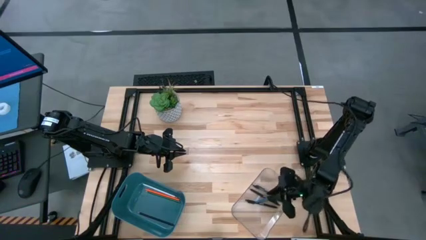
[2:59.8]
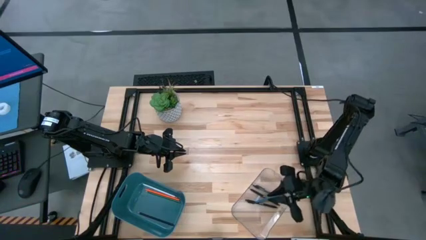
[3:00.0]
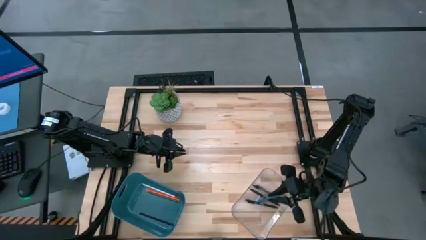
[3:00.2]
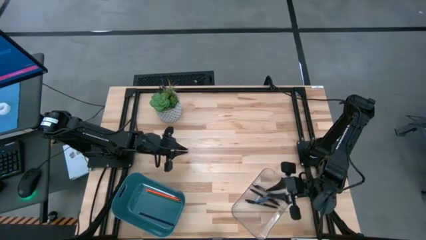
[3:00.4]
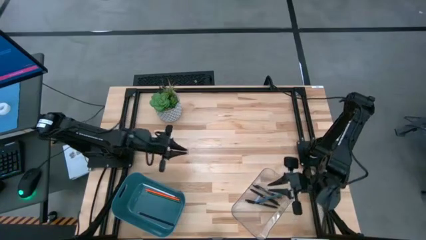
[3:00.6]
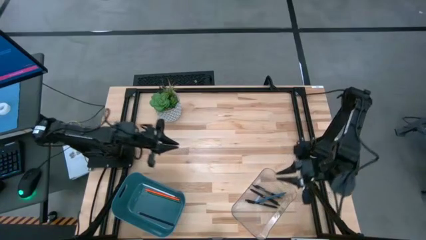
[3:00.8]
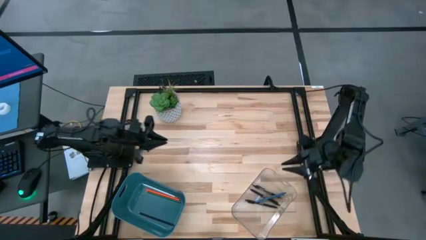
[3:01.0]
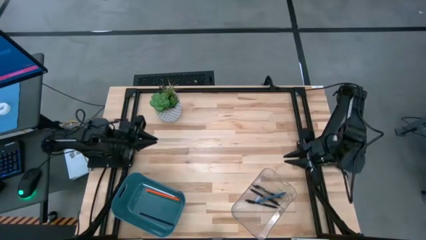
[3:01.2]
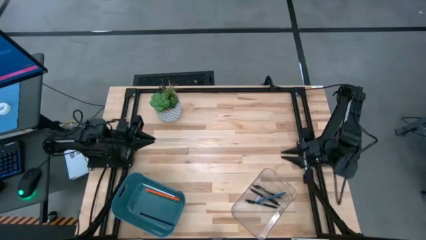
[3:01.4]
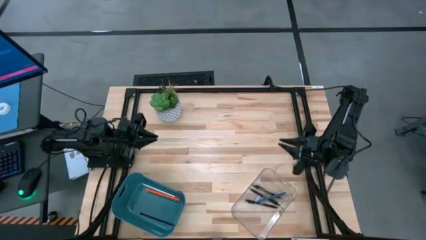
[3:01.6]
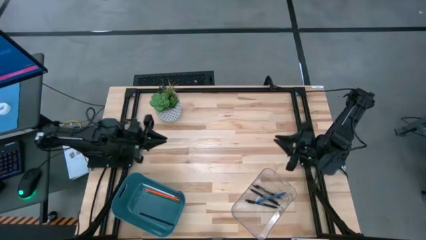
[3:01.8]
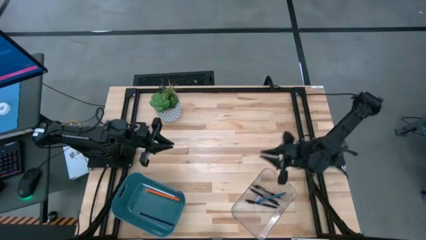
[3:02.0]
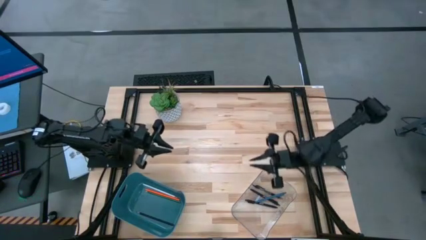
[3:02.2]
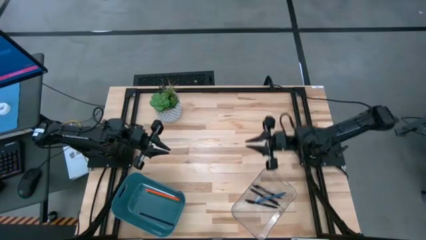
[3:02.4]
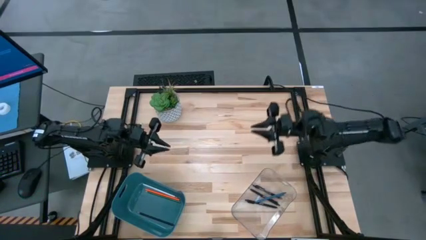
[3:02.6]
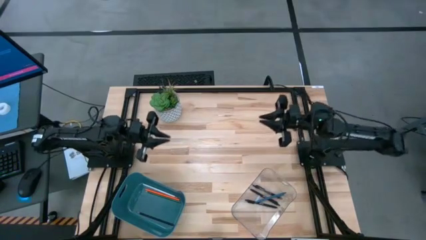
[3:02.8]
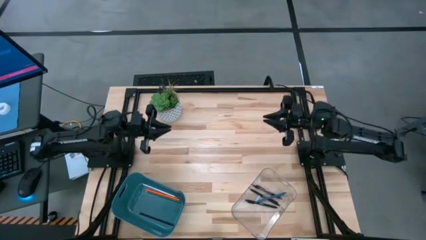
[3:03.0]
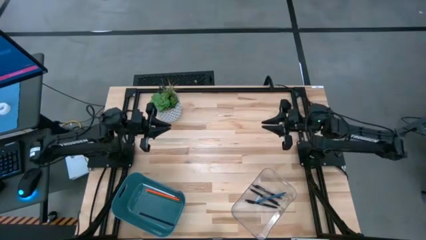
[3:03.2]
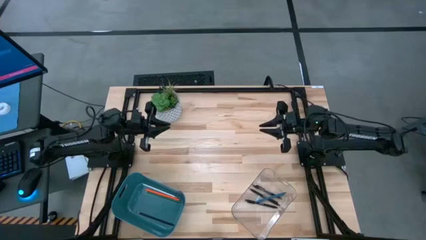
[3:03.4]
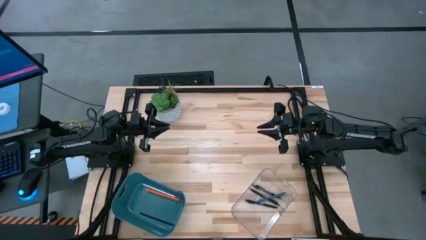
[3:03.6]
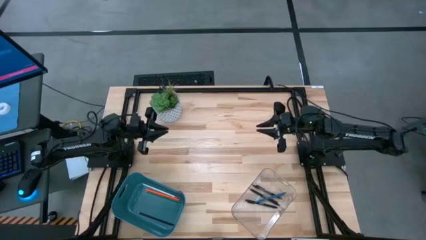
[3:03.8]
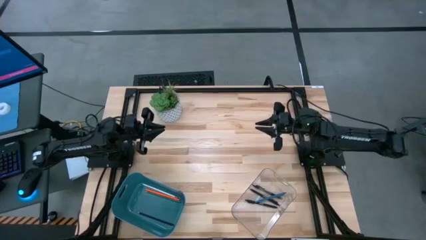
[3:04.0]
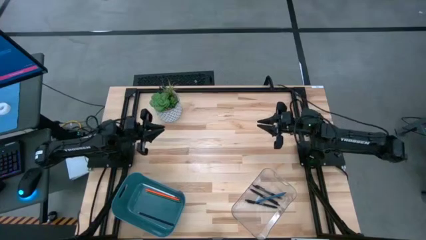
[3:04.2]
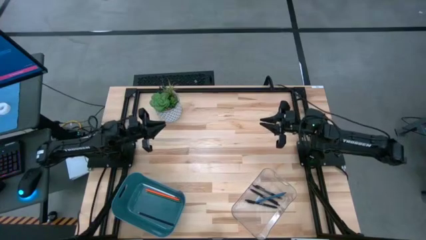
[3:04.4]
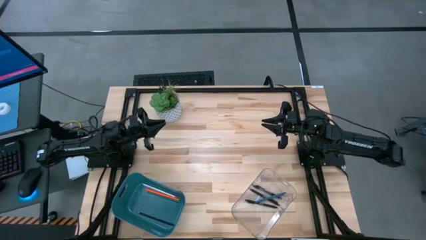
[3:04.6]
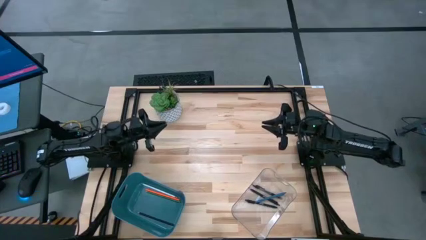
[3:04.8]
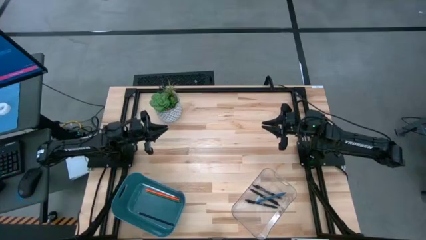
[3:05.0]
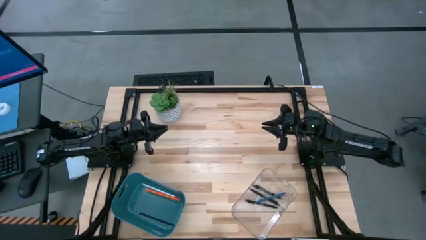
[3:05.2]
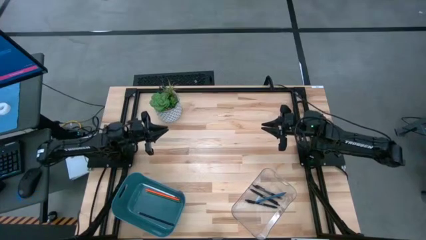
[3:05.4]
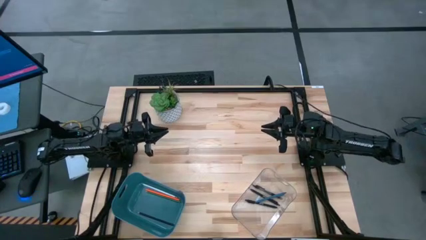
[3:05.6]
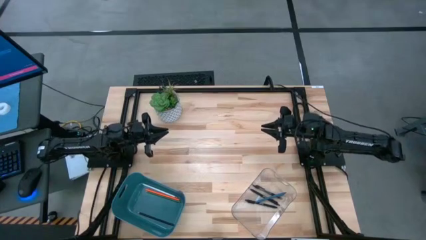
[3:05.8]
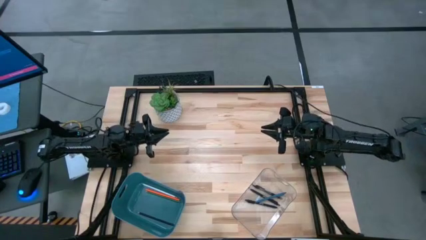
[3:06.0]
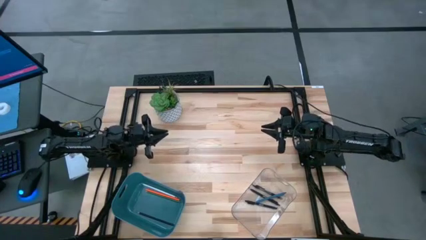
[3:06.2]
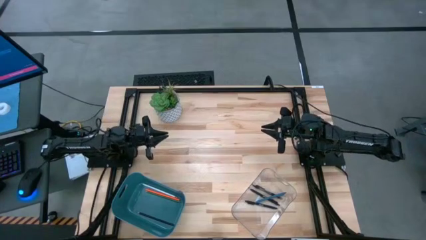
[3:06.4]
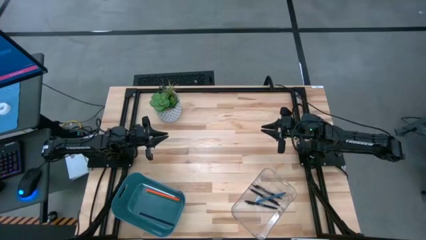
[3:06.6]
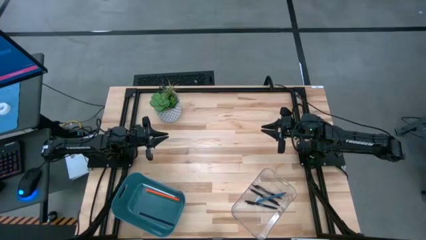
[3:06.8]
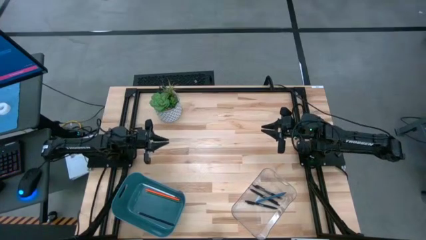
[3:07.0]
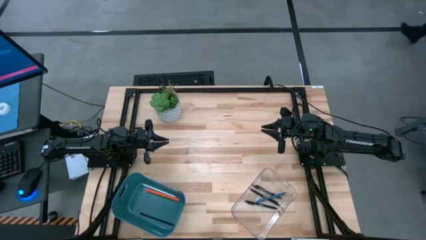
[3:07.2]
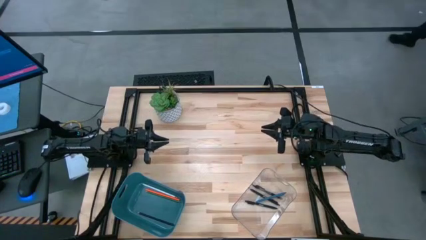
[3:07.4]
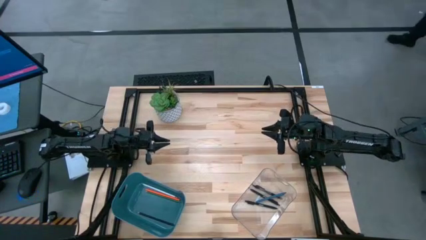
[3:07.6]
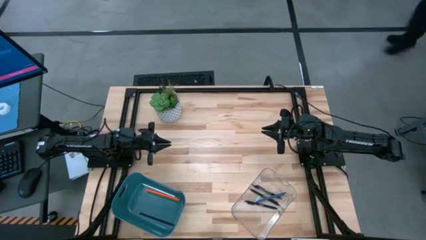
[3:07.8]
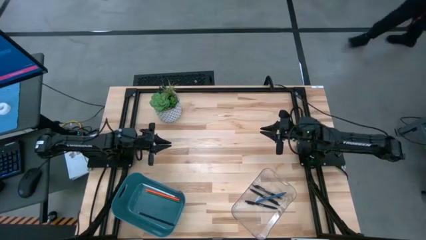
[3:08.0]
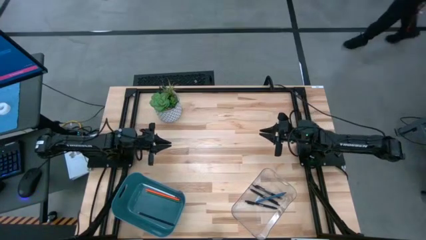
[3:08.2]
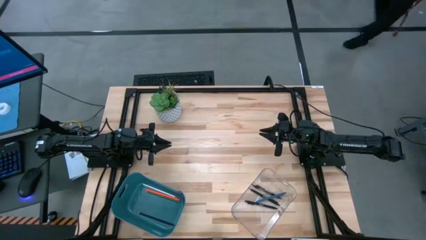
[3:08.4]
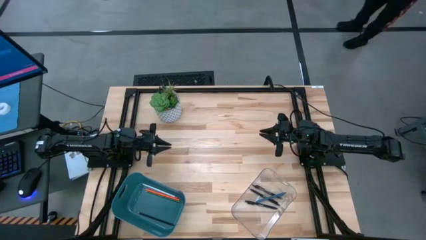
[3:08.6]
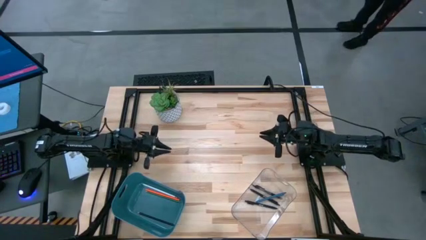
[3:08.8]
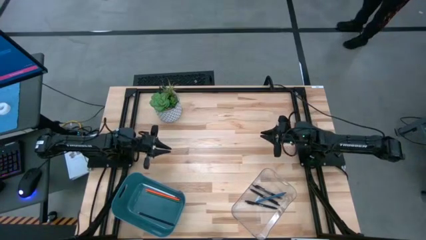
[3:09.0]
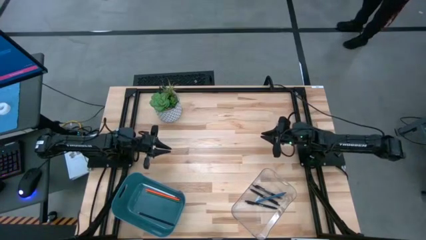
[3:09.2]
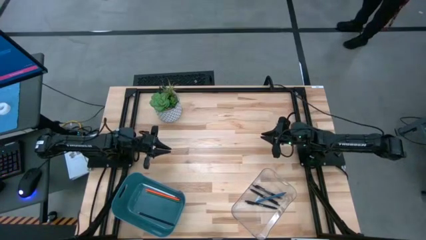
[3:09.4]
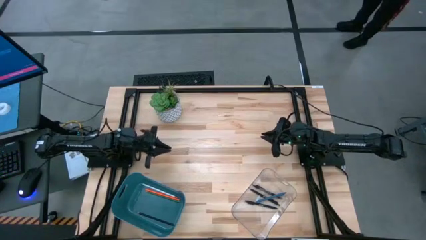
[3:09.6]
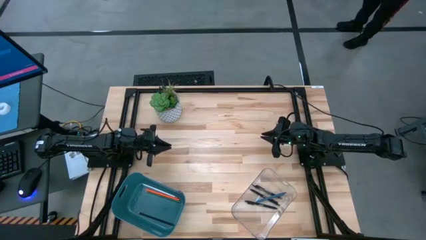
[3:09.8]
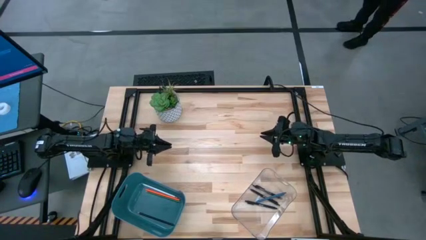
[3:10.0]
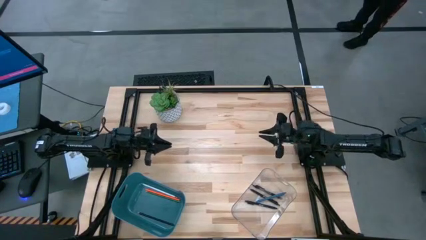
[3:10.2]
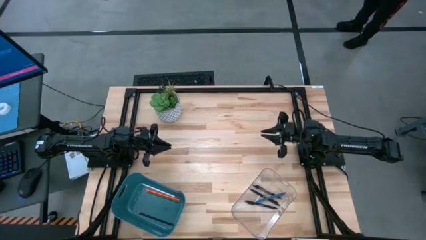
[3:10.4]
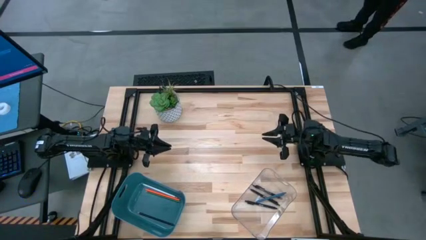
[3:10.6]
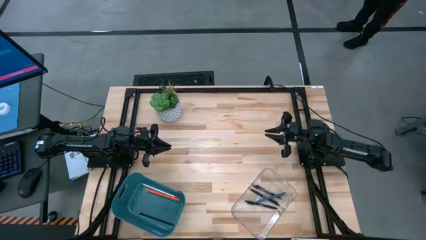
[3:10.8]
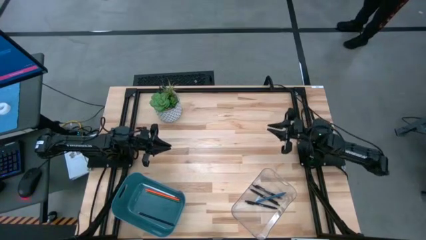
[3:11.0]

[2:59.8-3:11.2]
Task: Sort pens & pencils
Return to Home Position
